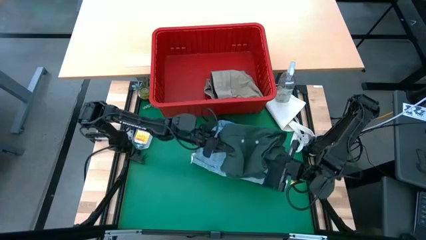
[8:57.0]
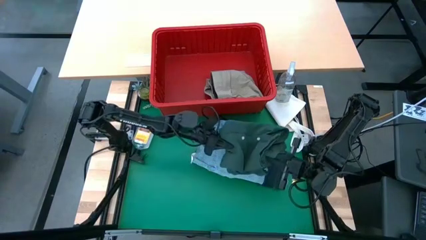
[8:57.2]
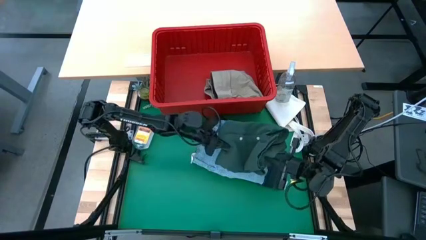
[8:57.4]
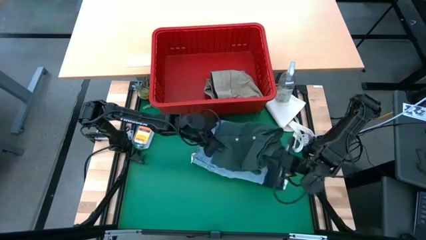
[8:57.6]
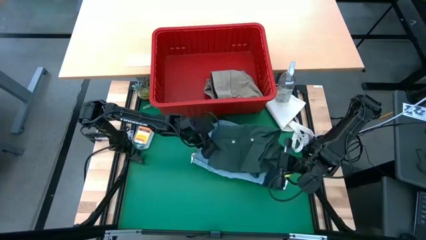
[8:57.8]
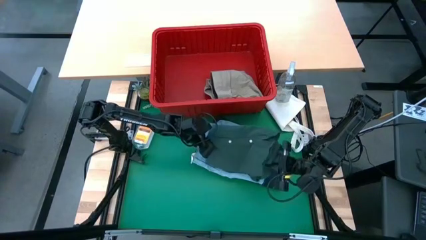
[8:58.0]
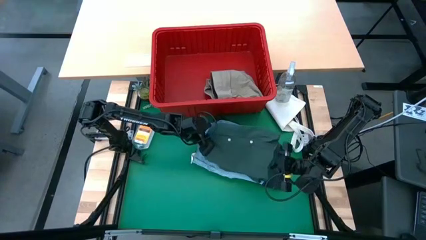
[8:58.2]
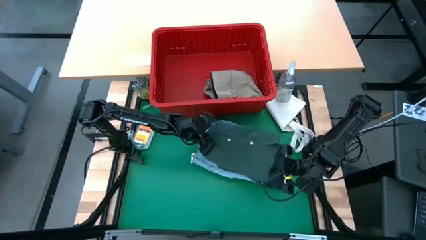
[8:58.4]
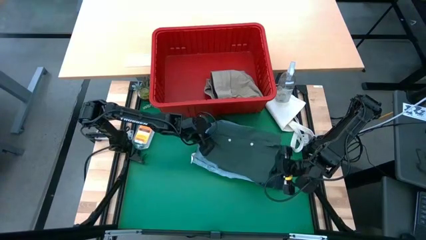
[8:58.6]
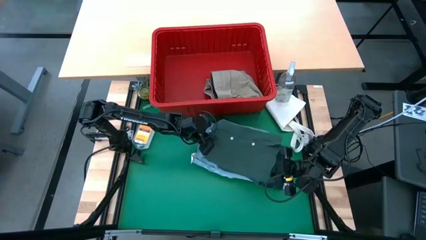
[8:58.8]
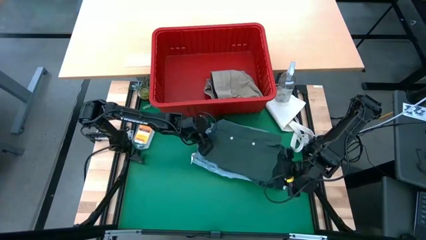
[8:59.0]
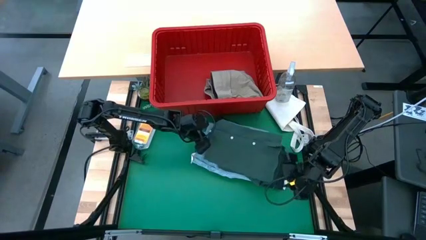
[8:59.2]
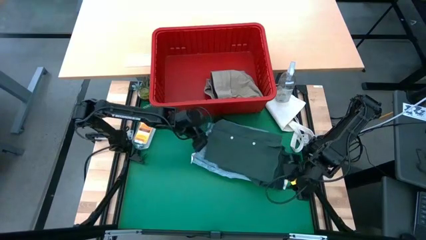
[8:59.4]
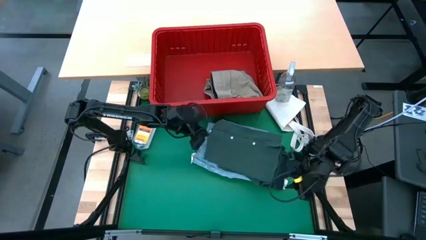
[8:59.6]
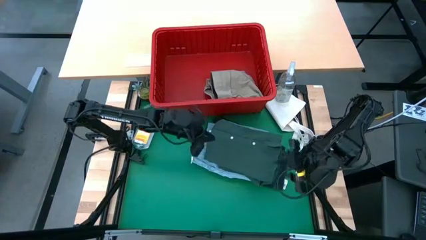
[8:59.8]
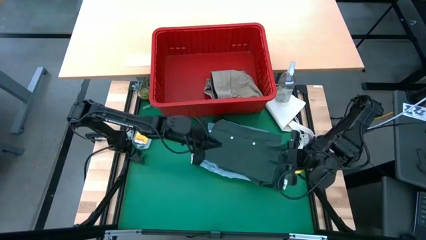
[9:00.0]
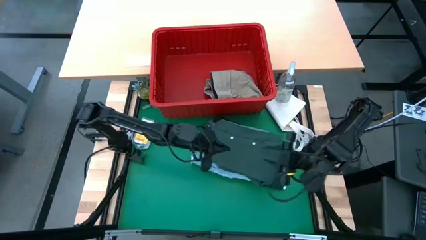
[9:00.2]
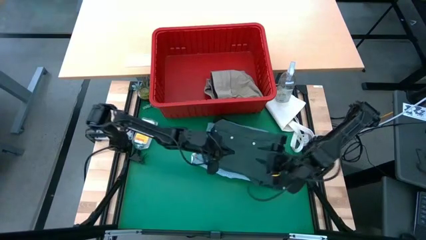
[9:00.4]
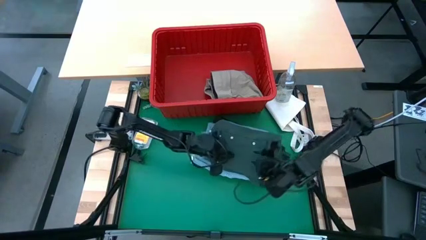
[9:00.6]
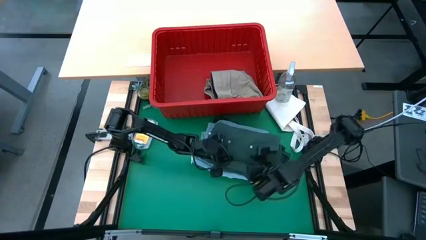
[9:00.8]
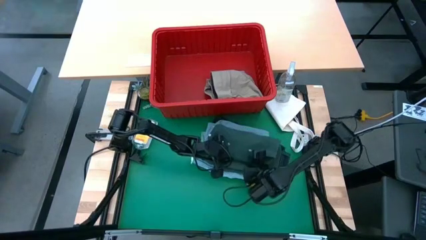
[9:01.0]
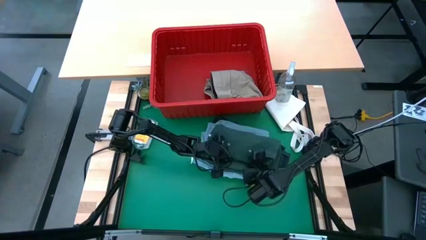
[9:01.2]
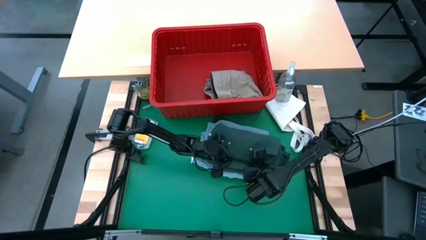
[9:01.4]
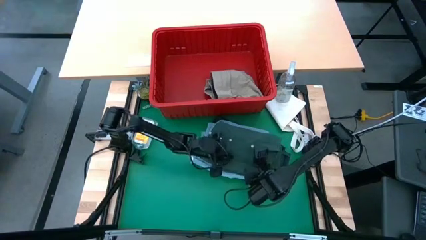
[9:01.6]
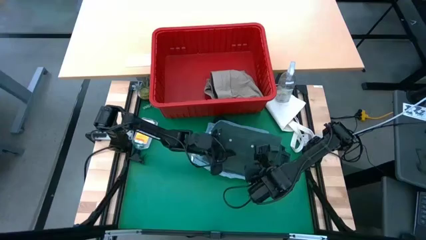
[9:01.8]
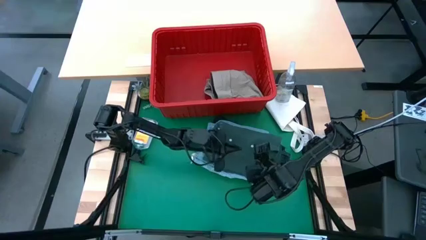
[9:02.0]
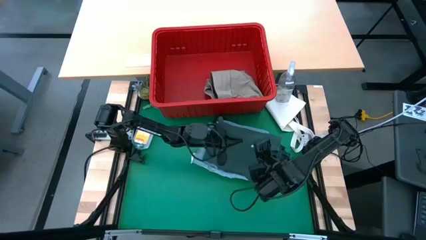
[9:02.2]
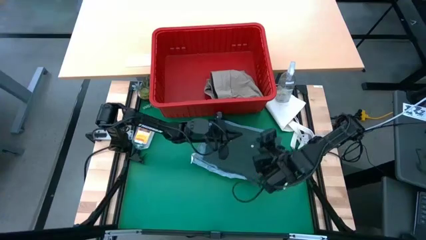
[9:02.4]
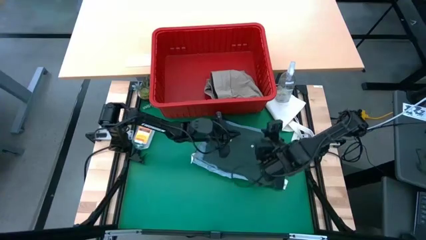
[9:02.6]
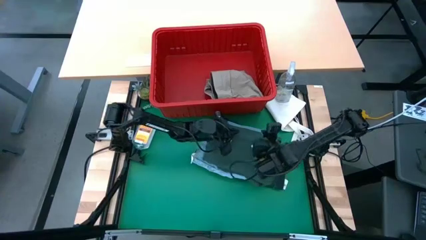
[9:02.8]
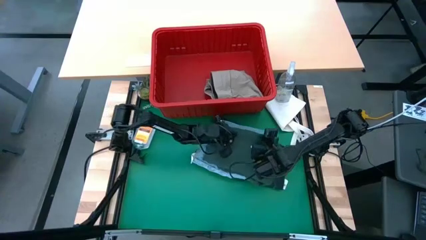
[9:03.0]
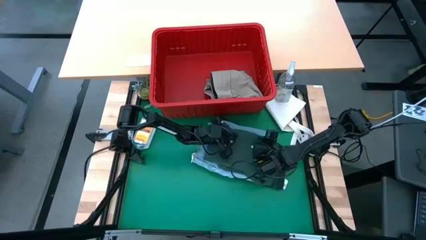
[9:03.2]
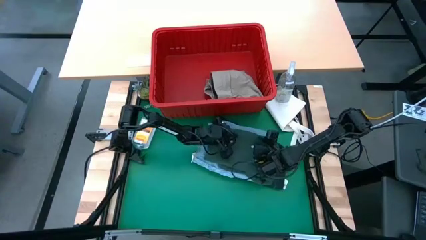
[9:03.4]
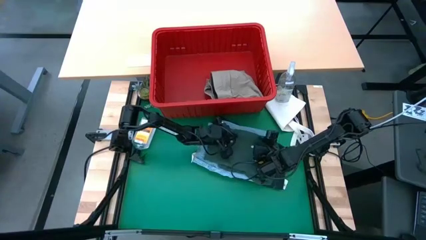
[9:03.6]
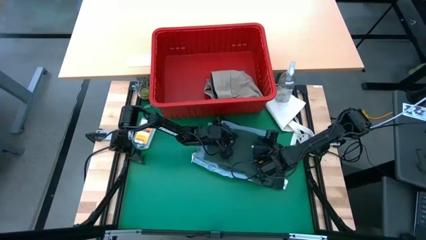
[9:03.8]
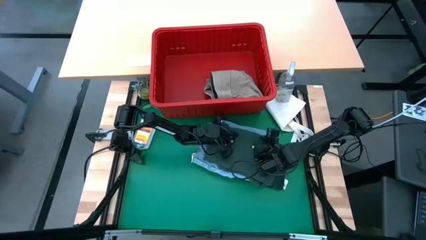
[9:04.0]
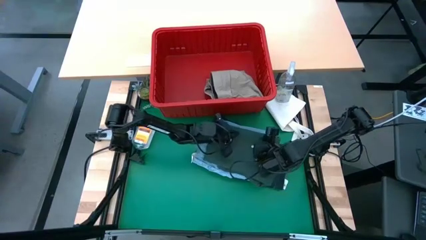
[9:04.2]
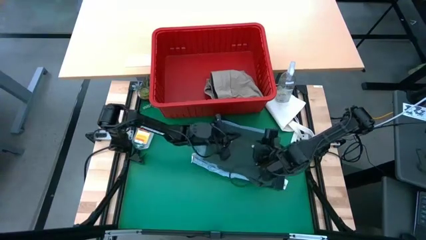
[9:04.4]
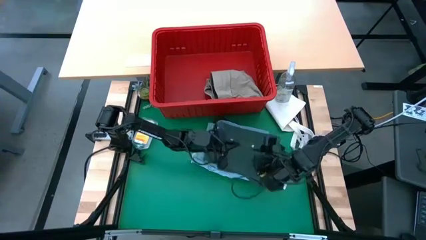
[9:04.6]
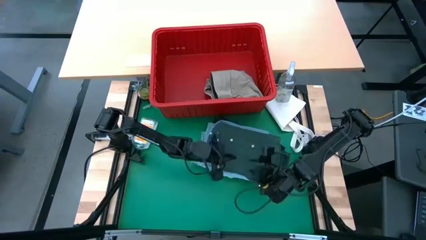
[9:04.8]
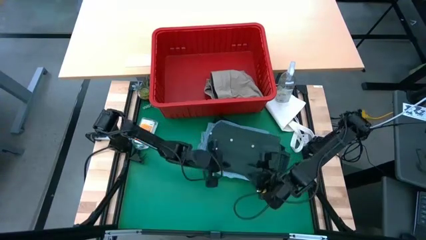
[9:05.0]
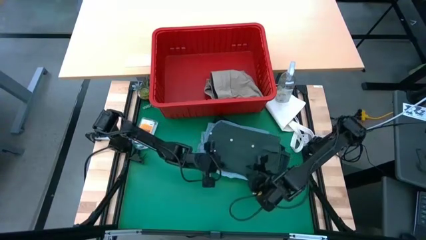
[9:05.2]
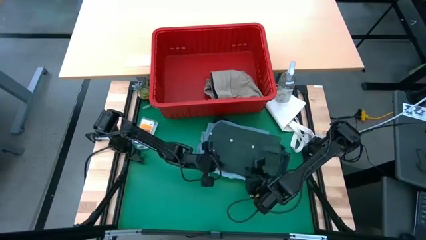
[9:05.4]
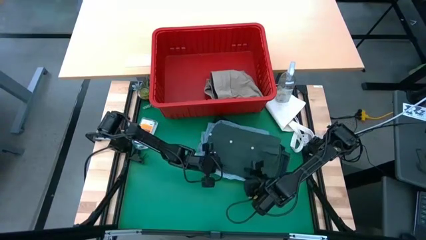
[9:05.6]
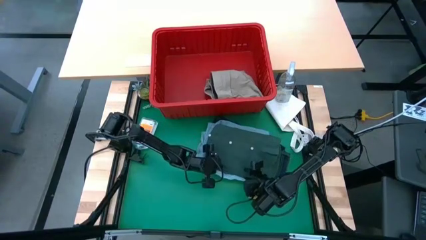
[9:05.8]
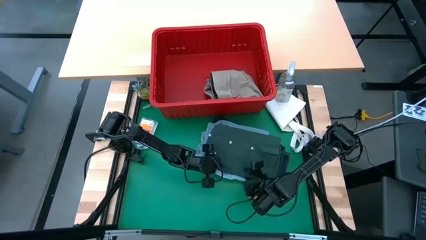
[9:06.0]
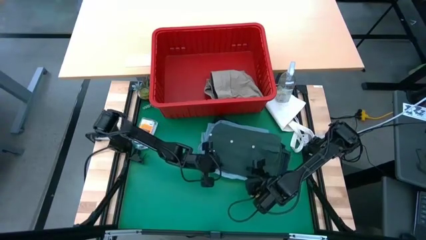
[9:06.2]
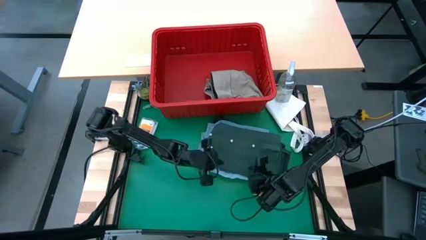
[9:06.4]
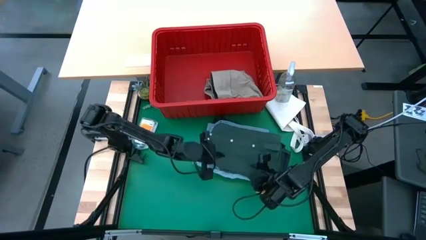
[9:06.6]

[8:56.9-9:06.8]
Task: Fold laundry
Stack the green shirt on top of the light blue jeans

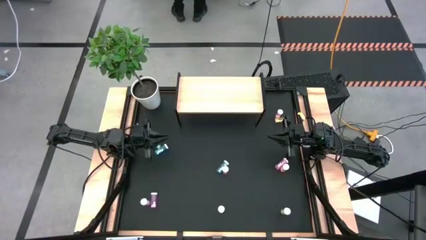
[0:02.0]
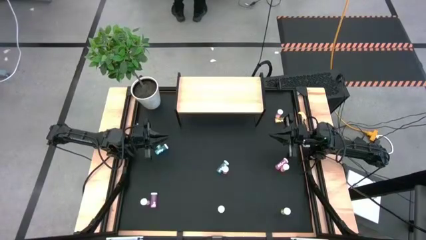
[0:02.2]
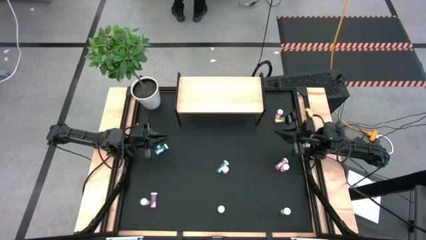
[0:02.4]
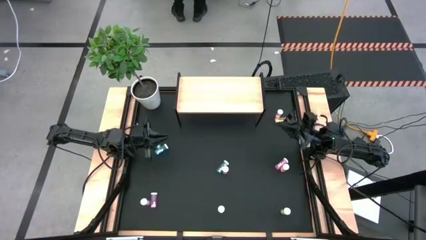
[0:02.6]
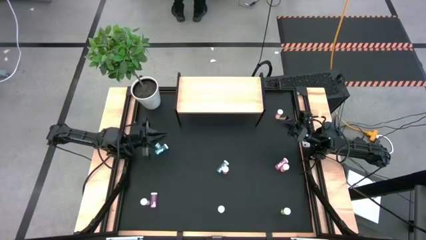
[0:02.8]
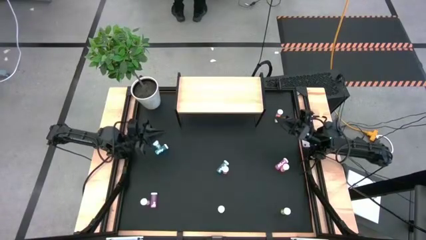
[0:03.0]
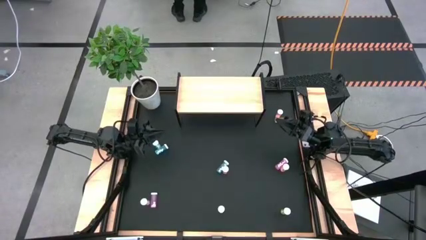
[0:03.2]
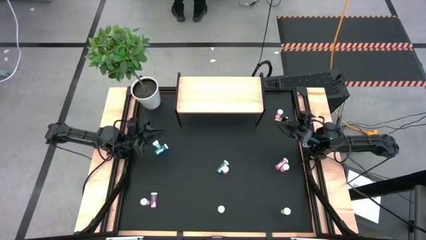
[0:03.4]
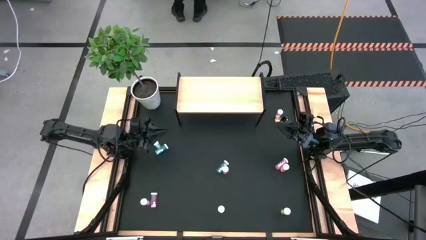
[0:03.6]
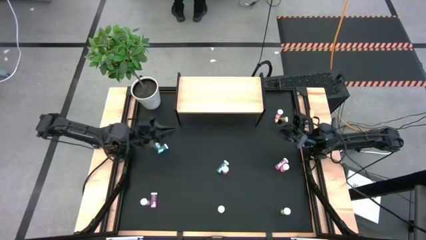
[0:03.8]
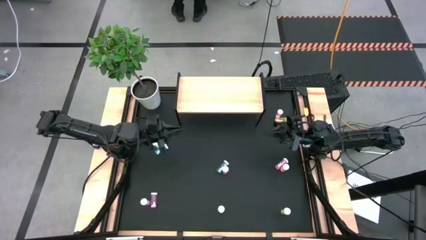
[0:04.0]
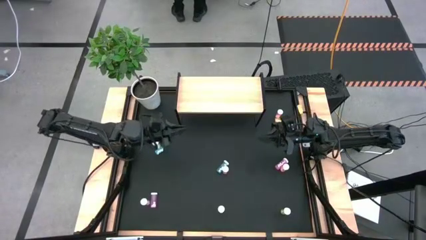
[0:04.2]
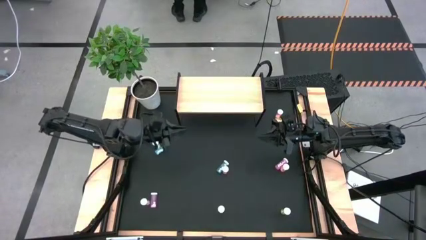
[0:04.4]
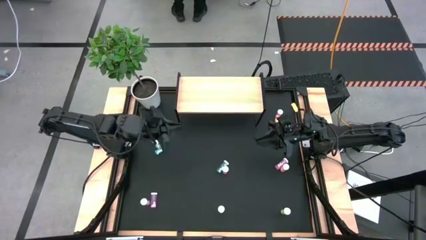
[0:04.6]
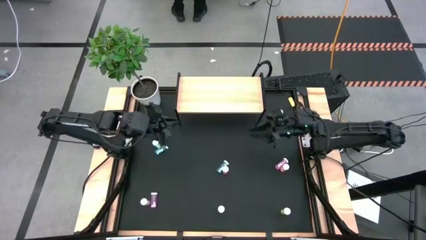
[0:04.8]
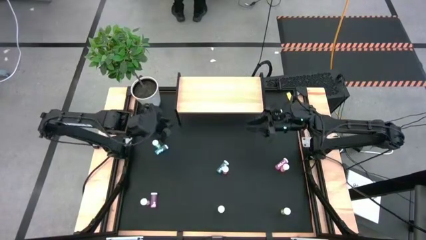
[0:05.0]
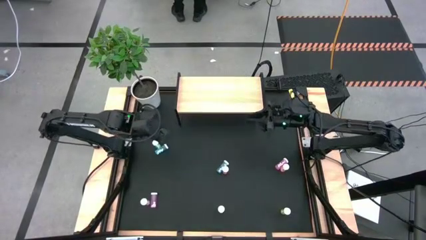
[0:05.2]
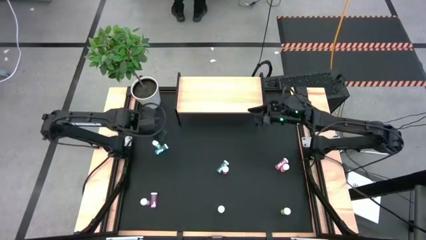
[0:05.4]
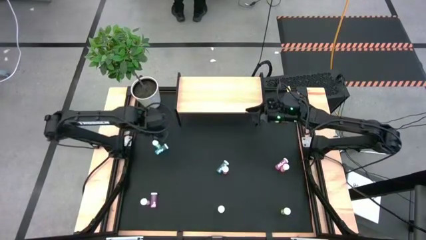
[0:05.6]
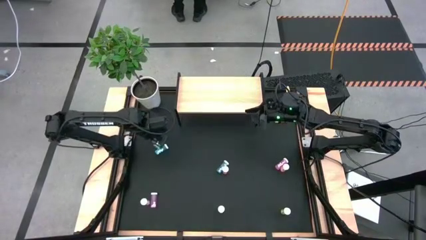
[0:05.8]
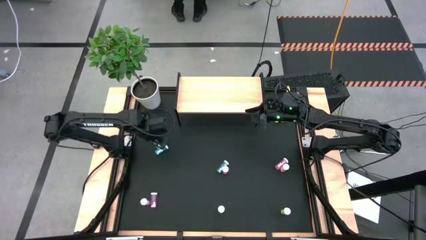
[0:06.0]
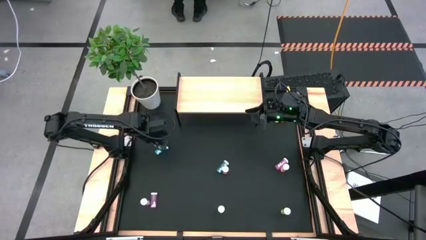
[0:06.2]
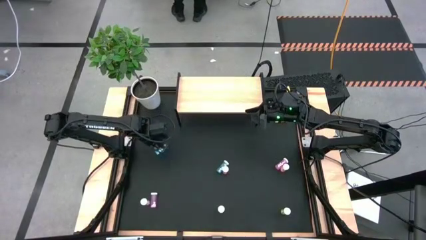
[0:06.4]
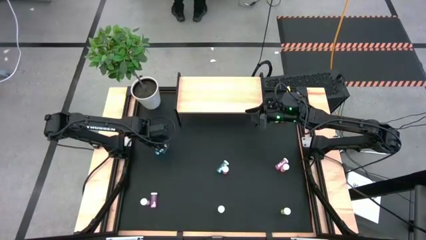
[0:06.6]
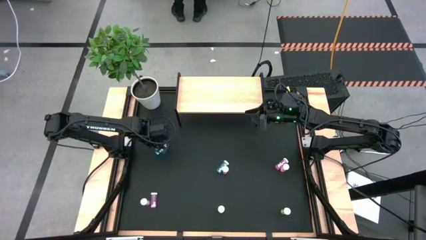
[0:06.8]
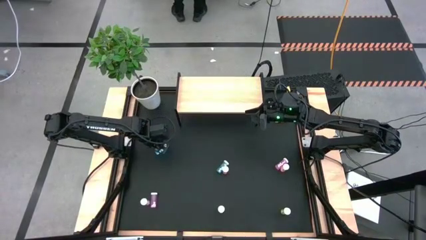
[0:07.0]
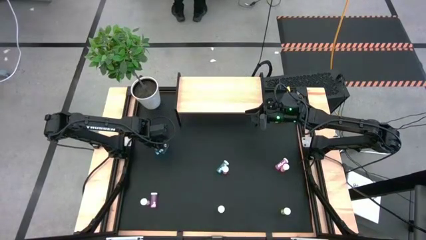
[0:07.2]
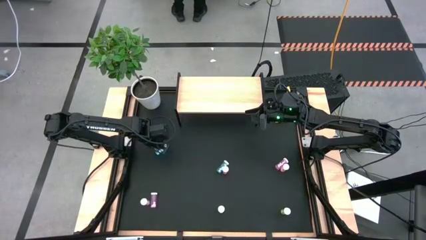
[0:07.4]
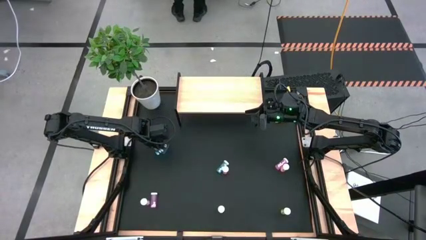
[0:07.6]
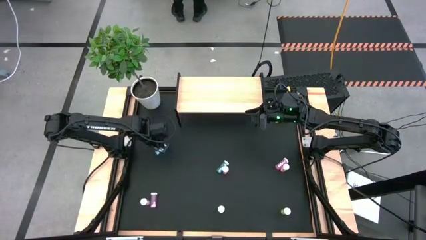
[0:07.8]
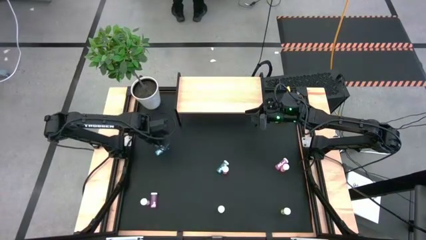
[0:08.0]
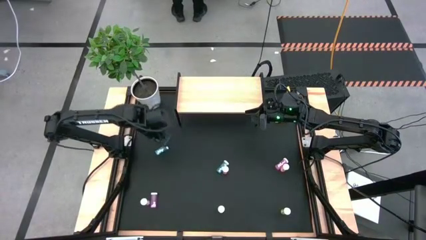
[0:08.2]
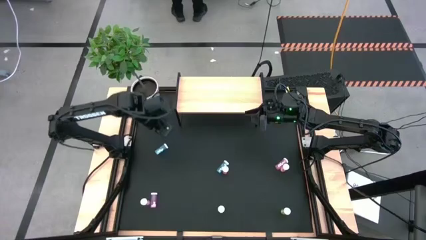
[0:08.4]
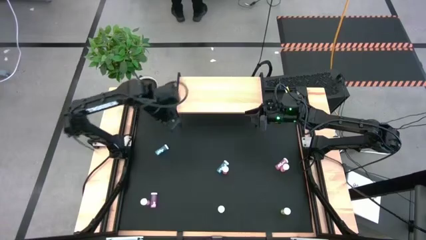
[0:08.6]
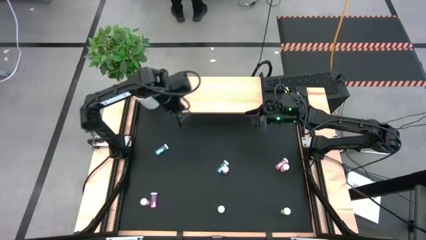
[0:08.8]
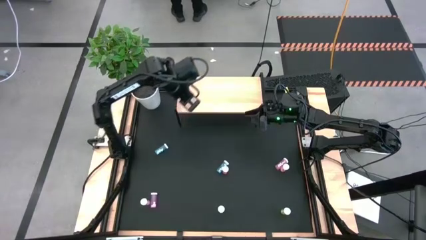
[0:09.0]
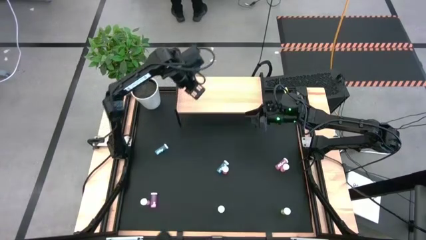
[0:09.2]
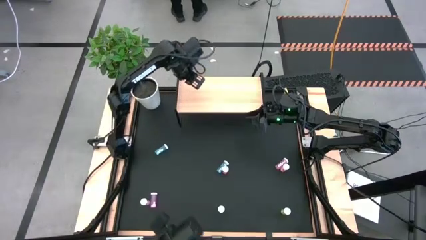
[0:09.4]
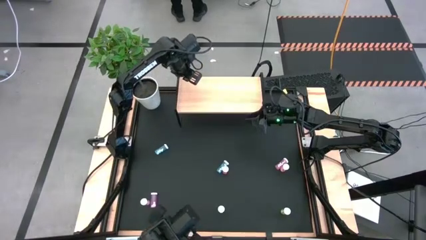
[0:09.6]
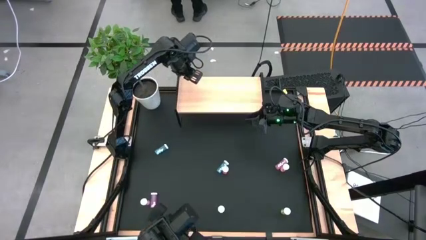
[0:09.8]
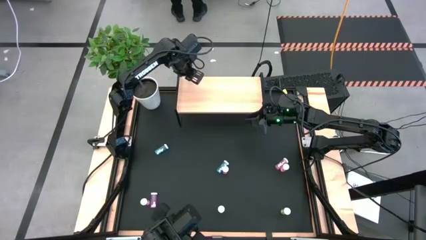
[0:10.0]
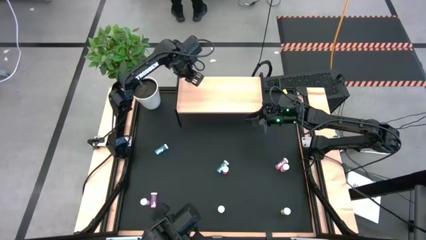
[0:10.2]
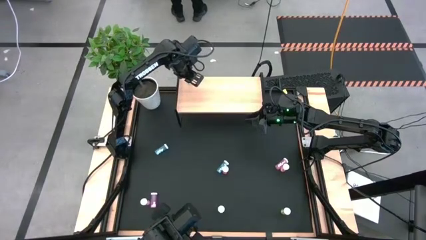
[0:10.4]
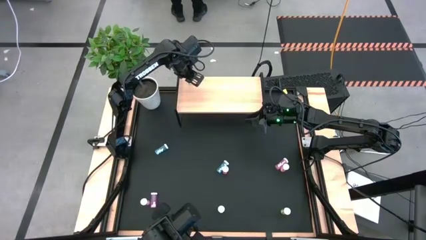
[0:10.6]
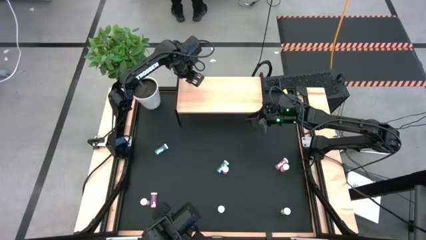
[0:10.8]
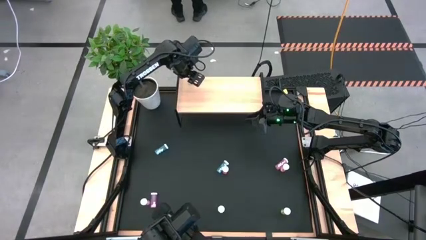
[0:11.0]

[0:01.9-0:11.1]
Task: Pick and place medicine bottles onto shelf by color
Put the top left blue pill bottle on the shelf
